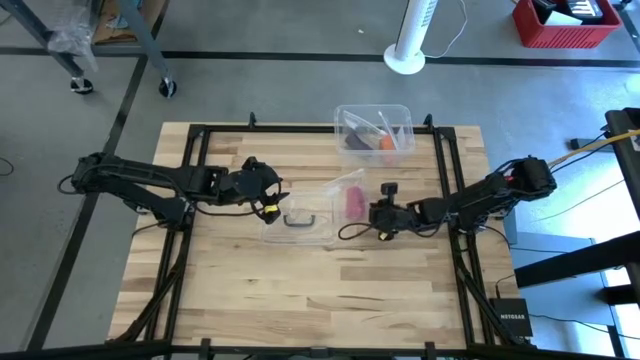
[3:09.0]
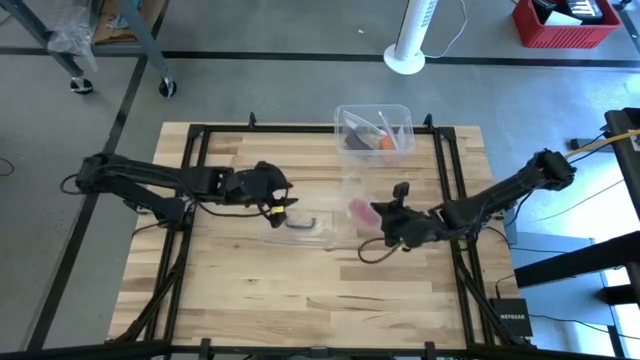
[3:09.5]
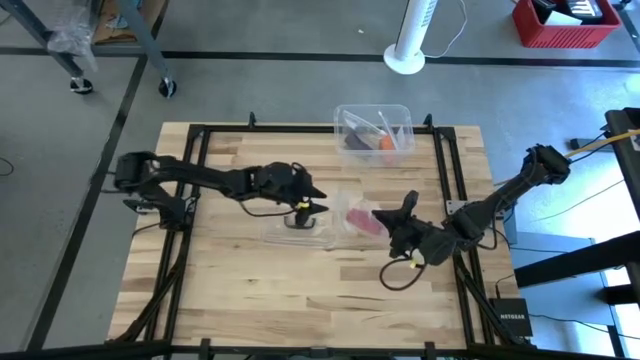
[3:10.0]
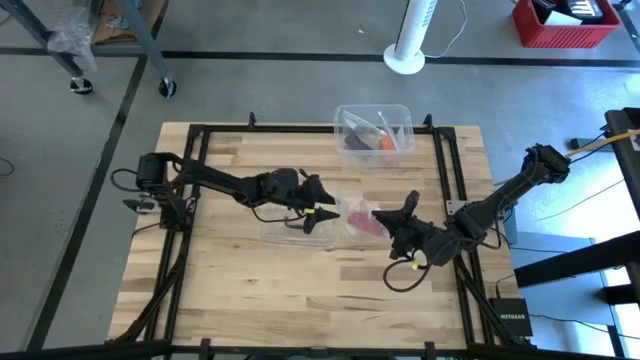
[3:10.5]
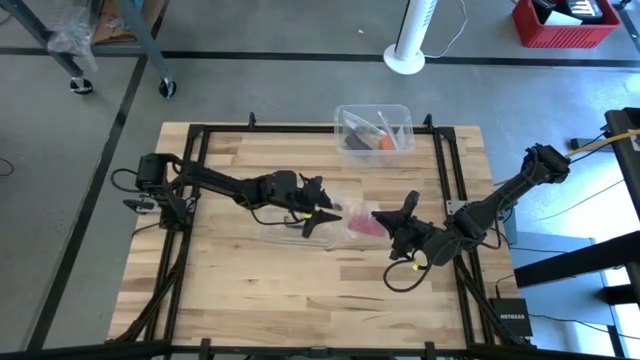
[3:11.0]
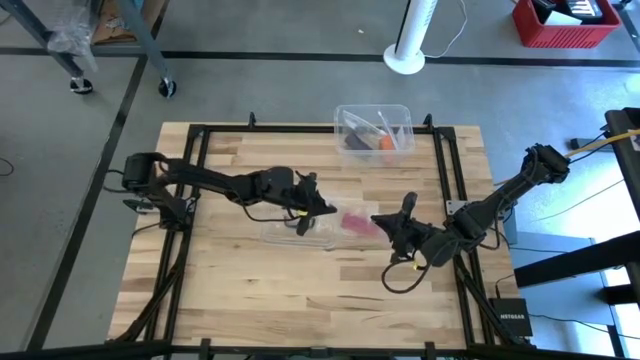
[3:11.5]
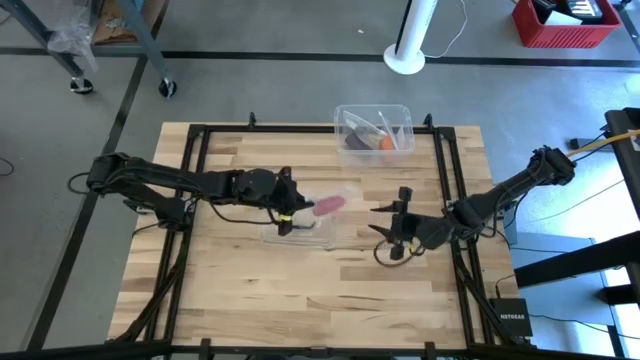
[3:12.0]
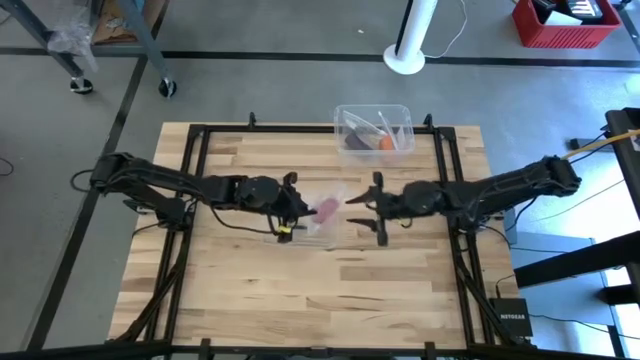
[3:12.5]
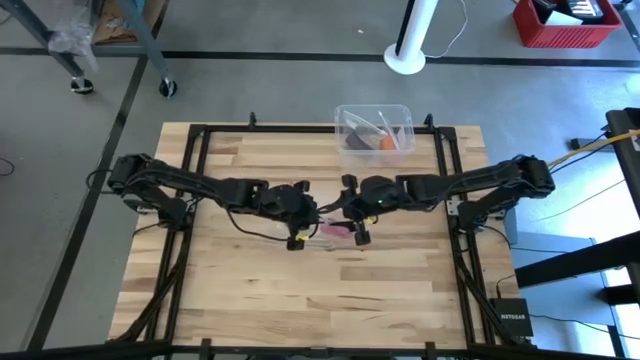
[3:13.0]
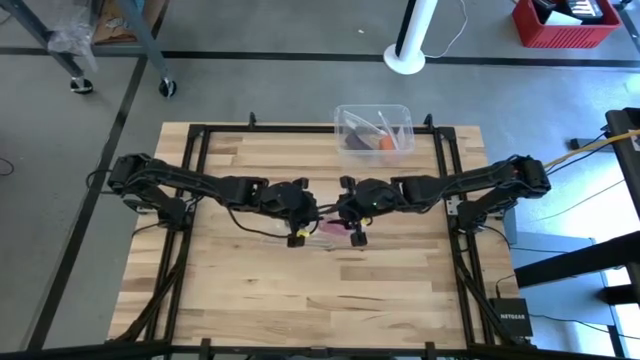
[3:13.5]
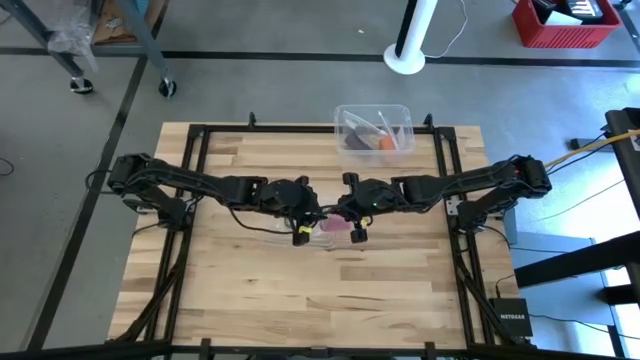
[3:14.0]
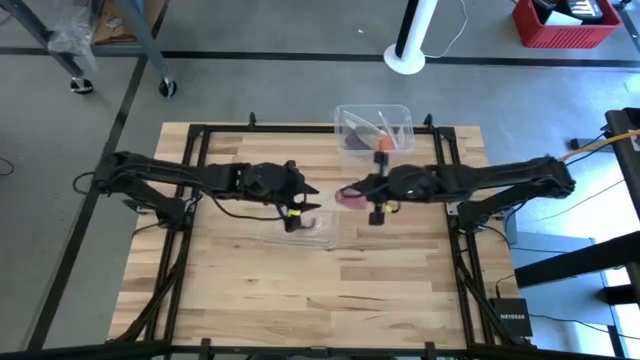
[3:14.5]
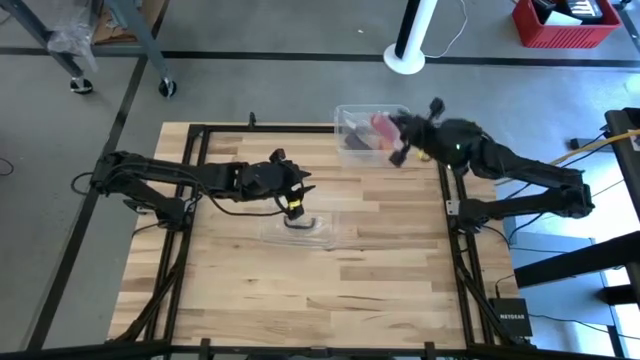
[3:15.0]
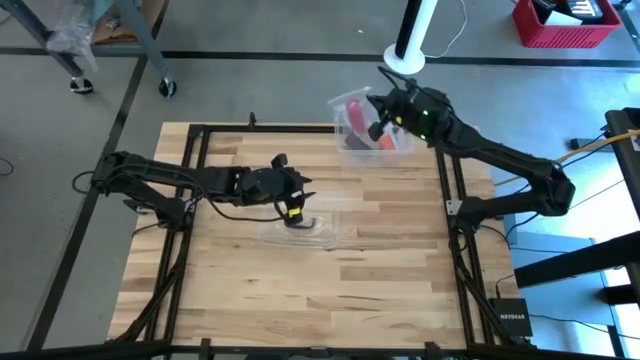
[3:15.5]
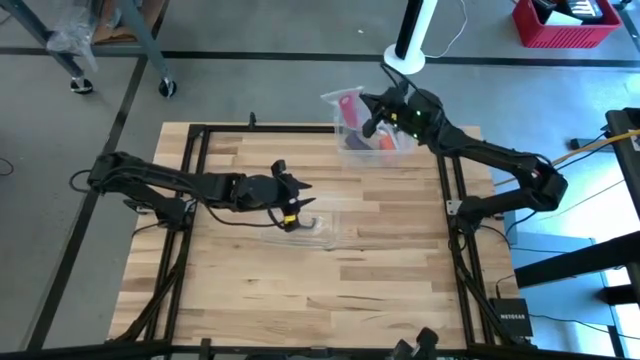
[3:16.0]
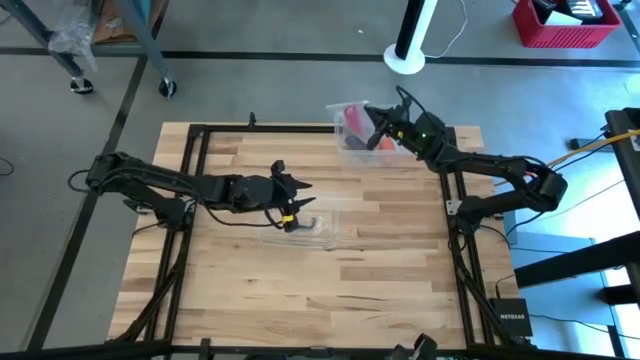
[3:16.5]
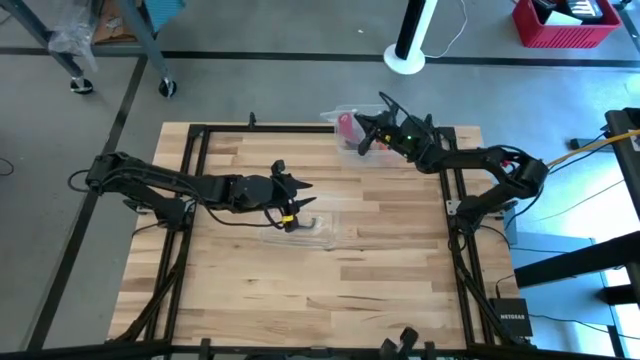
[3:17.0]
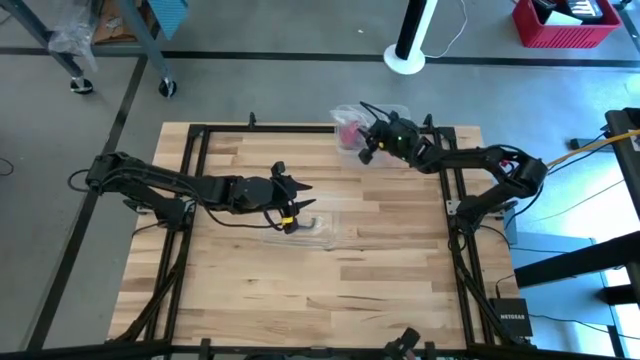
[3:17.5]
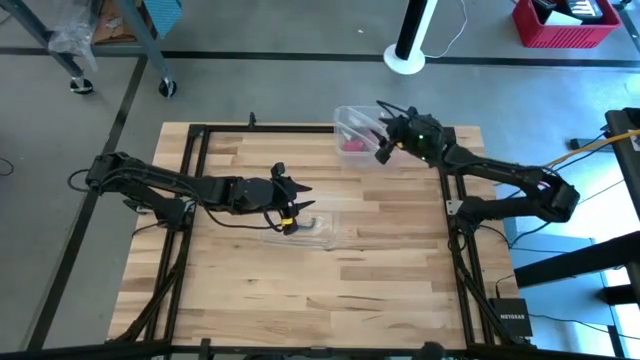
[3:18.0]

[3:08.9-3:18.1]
Task: Roll bandage
Put the transparent zip lock bag into the transparent bin

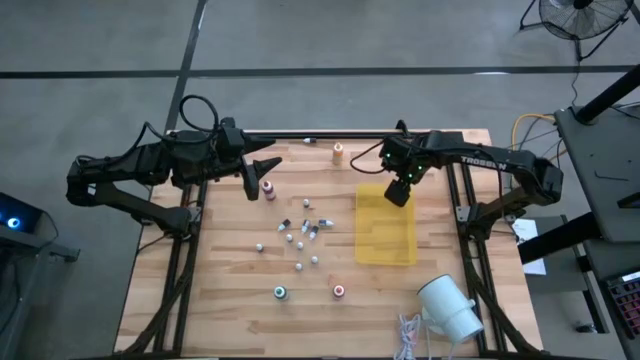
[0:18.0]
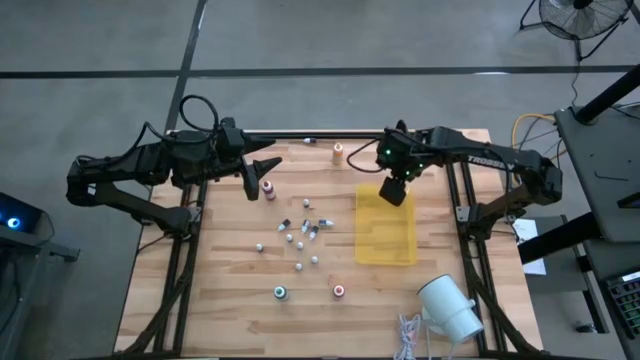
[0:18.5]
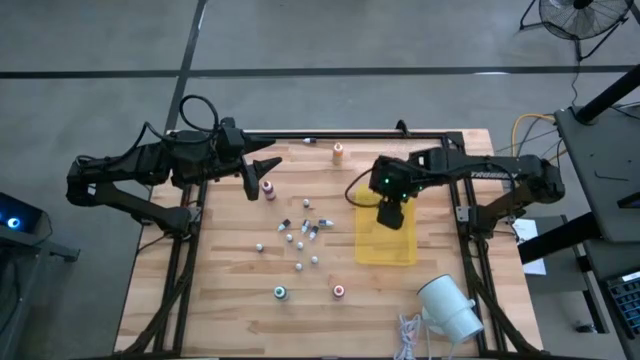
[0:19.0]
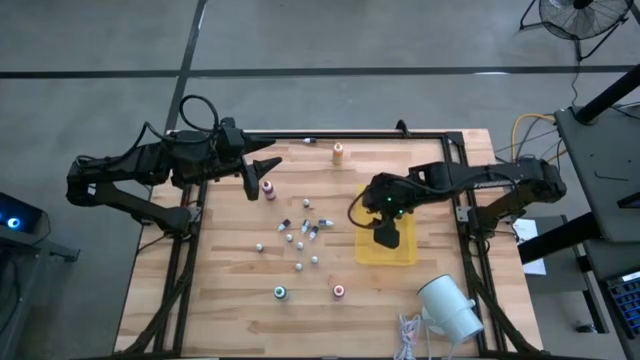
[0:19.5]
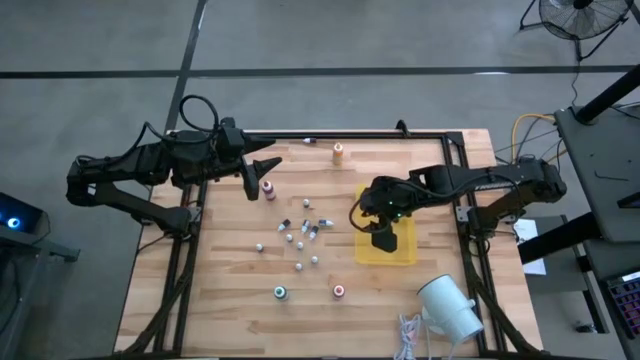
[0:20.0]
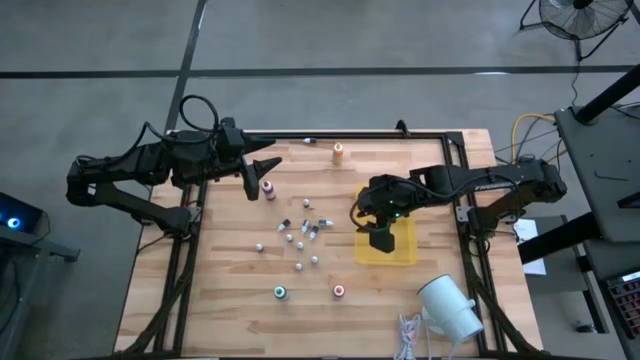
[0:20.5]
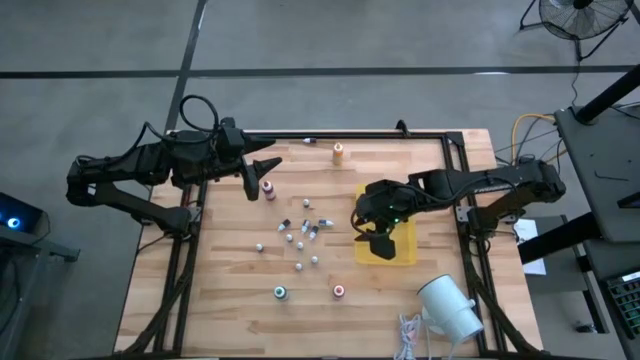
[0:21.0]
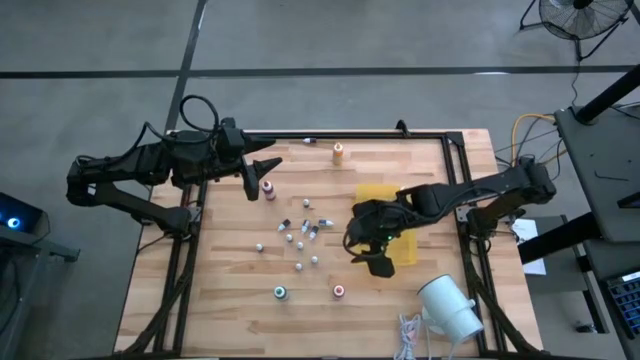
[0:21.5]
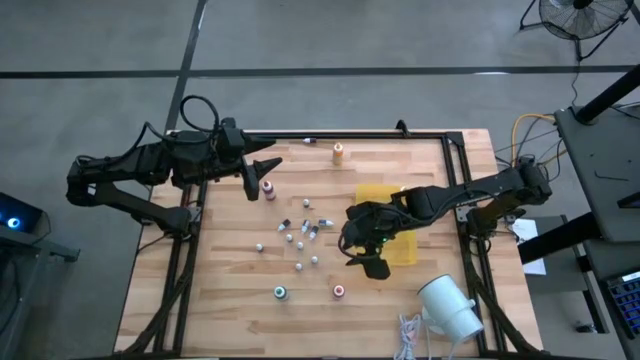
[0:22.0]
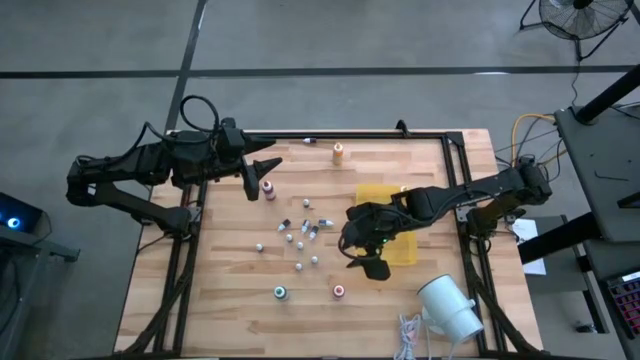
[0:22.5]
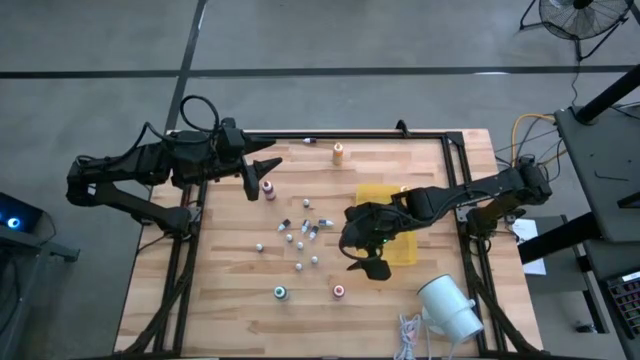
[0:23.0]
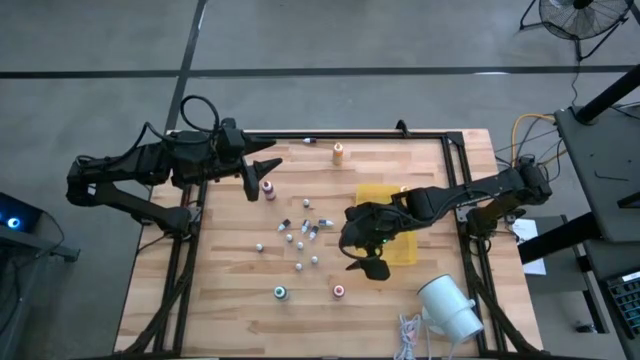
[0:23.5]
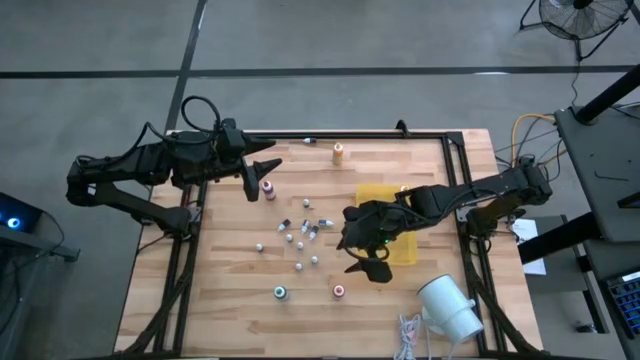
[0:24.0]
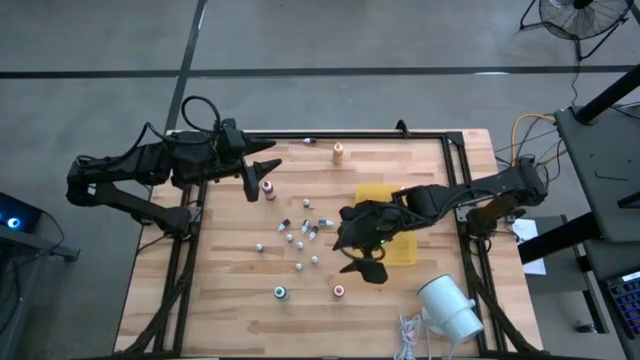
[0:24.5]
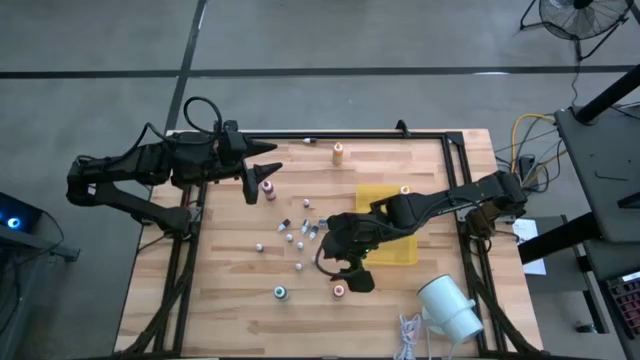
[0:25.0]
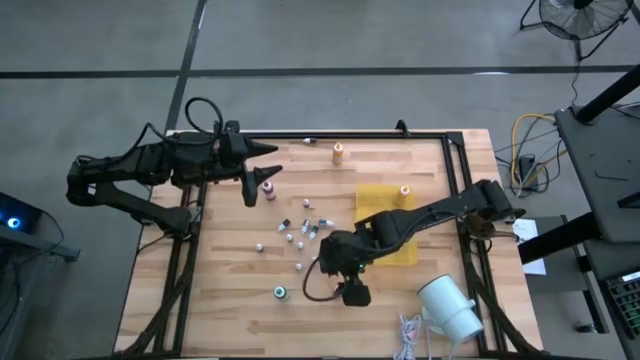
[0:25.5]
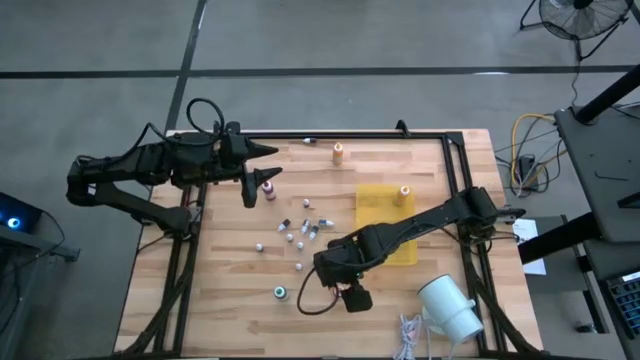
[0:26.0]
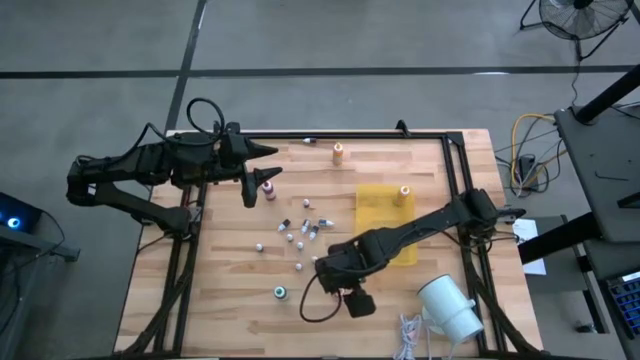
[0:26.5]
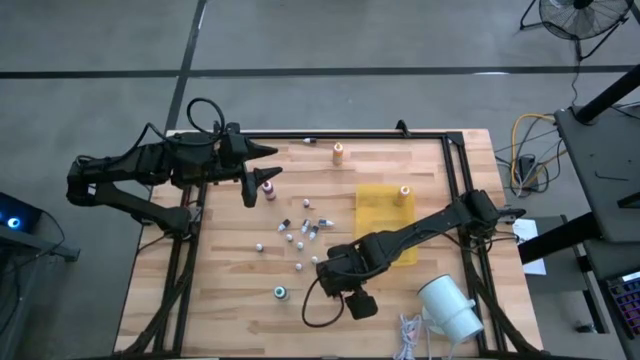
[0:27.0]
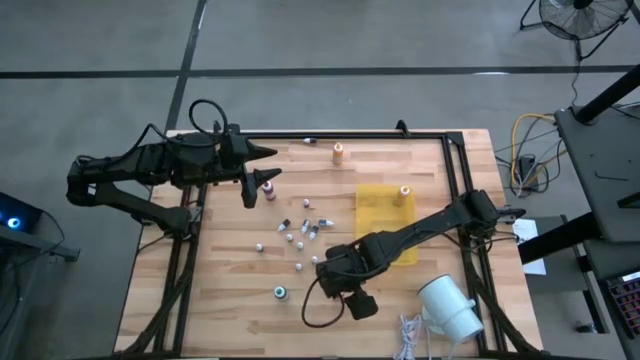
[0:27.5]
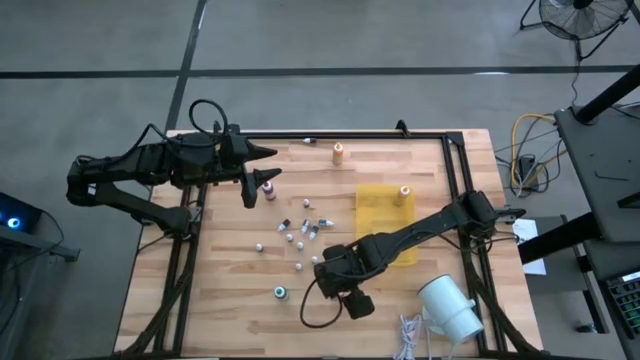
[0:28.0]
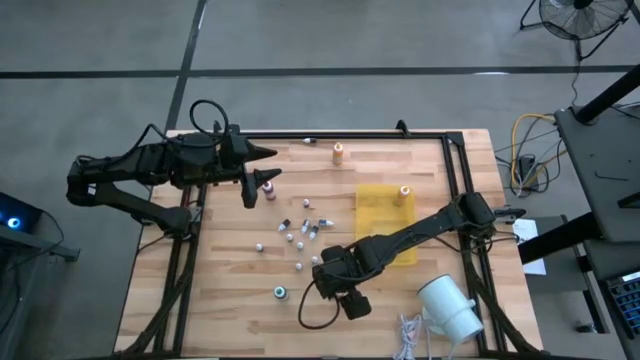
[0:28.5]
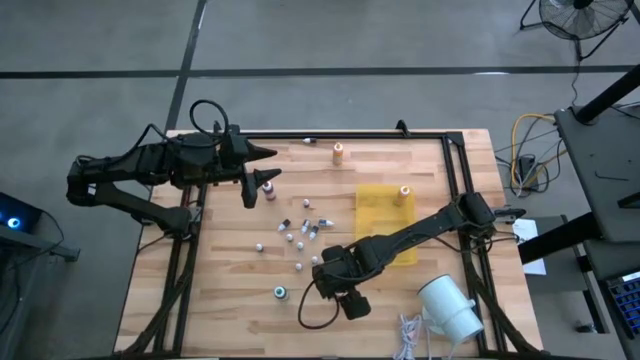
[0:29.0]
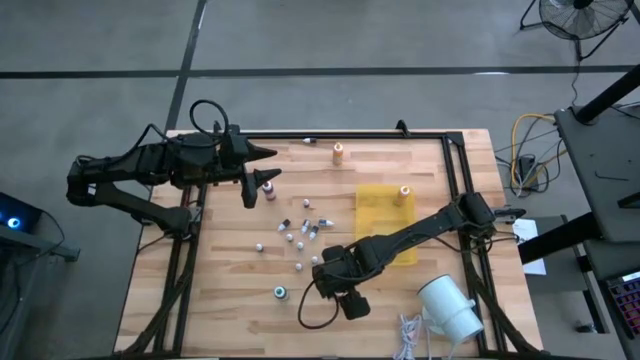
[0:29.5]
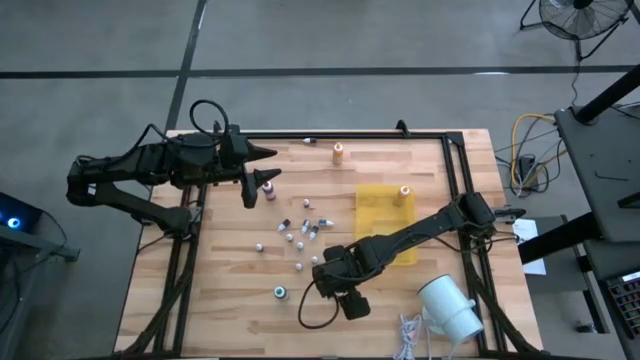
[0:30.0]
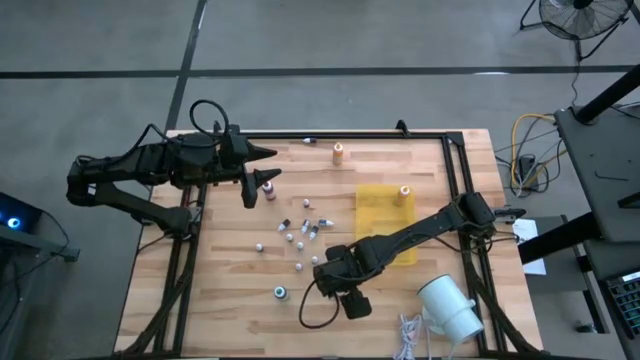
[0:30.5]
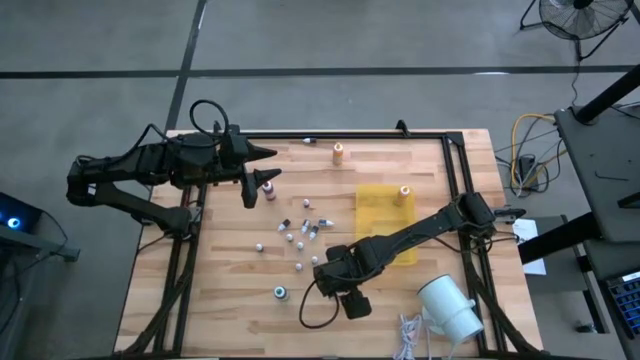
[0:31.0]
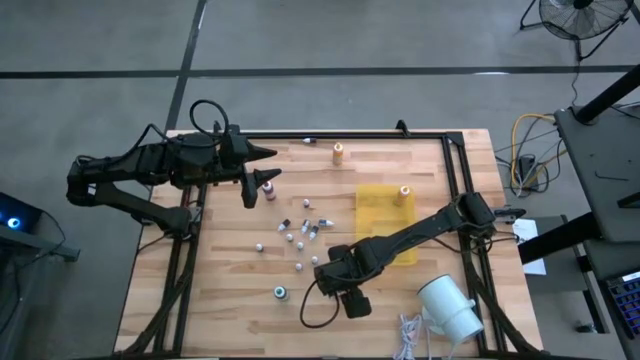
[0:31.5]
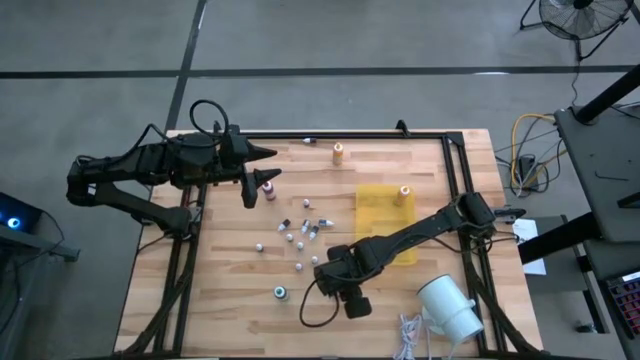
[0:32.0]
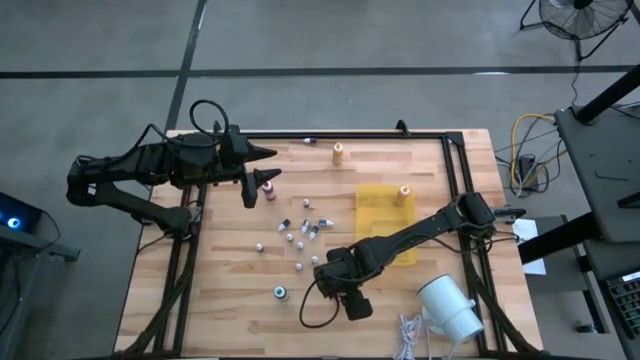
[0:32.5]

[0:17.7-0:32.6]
Task: Pick & Place food coloring
Put the big orange food coloring bottle into the yellow bin
